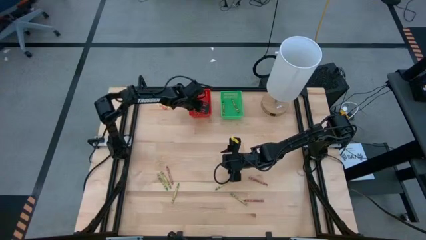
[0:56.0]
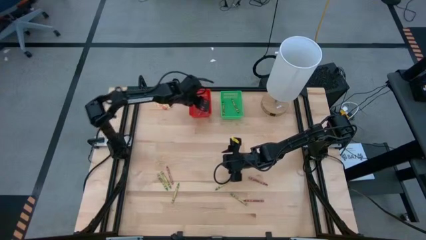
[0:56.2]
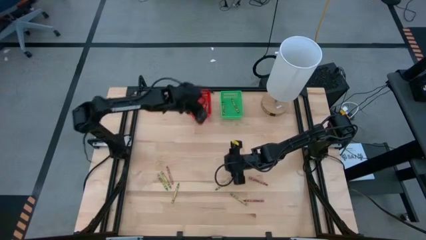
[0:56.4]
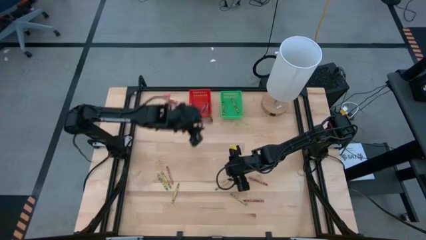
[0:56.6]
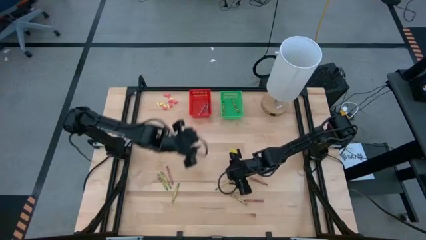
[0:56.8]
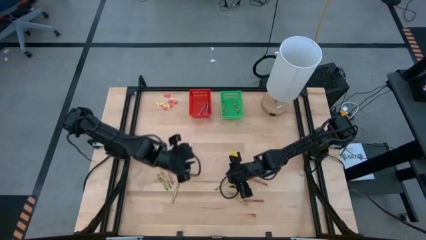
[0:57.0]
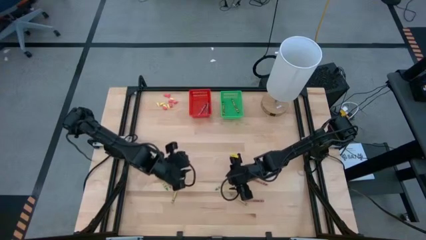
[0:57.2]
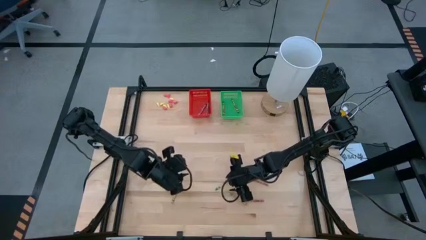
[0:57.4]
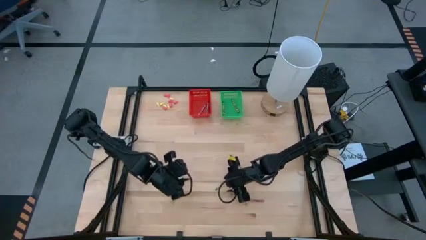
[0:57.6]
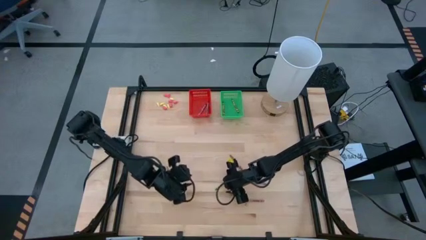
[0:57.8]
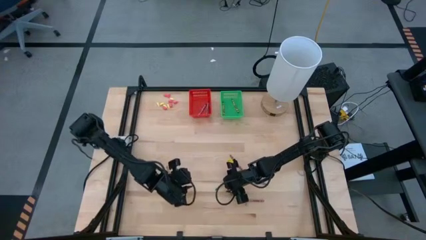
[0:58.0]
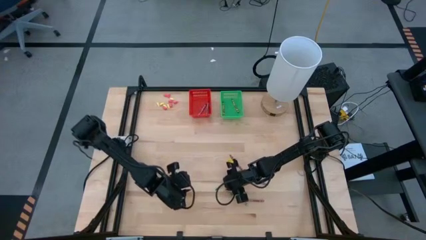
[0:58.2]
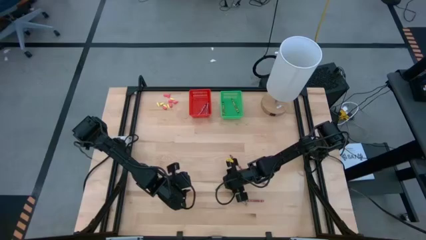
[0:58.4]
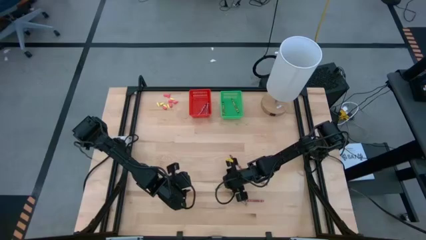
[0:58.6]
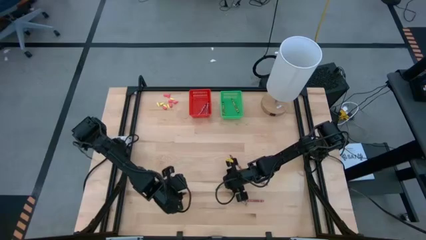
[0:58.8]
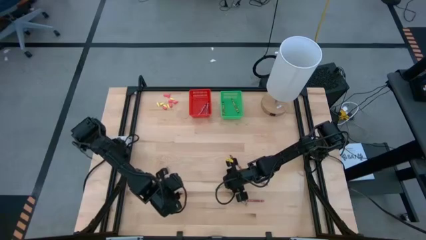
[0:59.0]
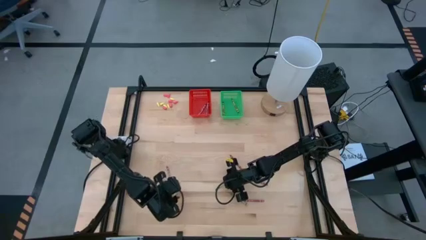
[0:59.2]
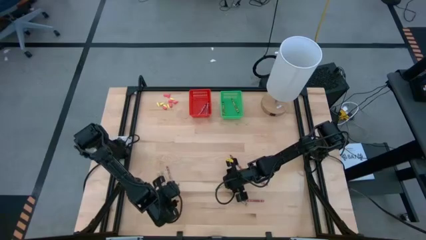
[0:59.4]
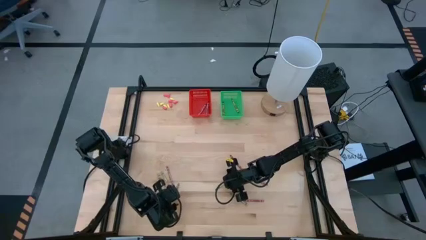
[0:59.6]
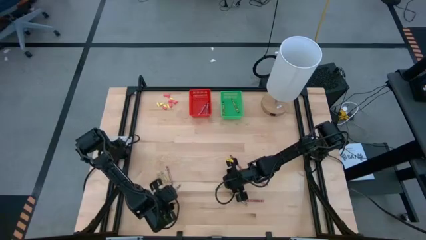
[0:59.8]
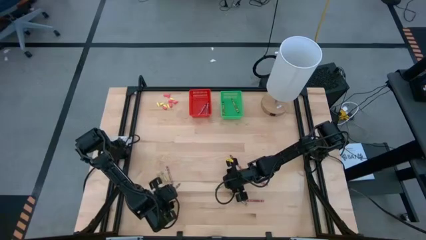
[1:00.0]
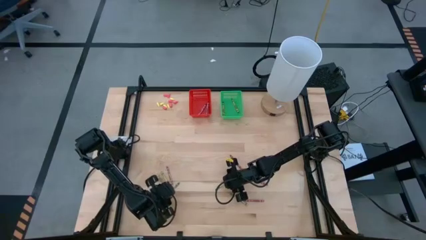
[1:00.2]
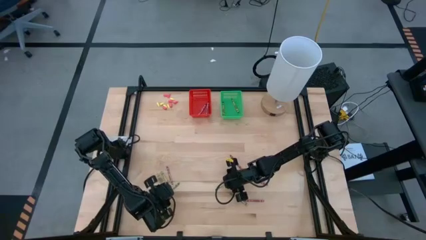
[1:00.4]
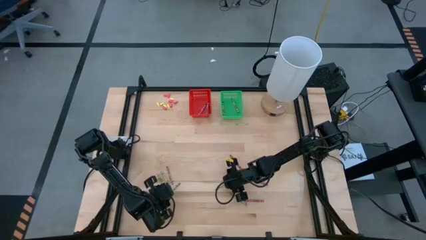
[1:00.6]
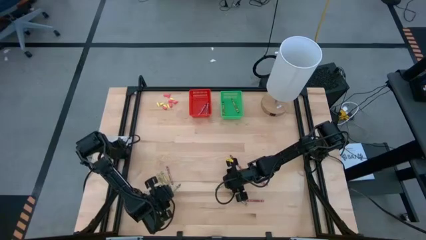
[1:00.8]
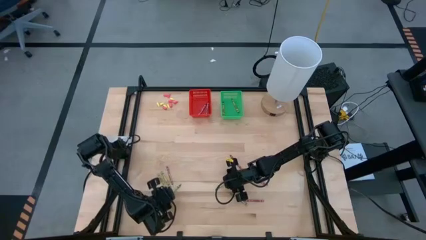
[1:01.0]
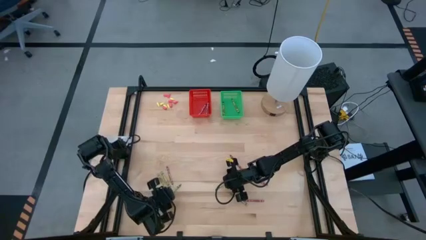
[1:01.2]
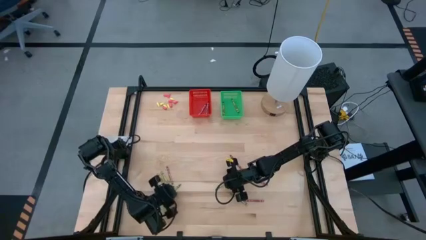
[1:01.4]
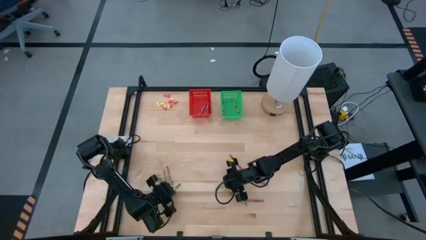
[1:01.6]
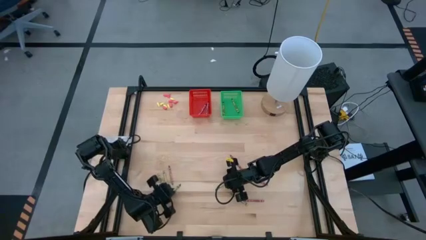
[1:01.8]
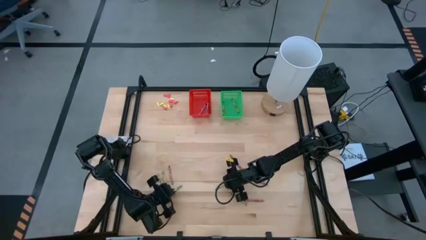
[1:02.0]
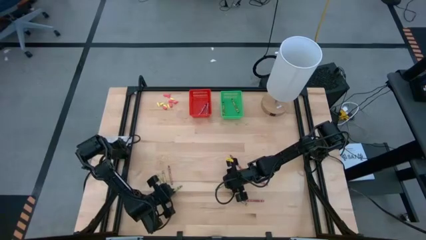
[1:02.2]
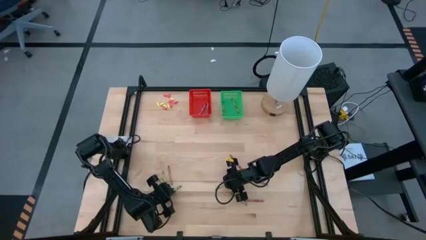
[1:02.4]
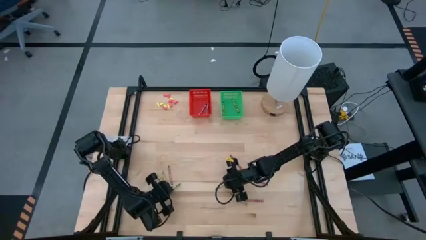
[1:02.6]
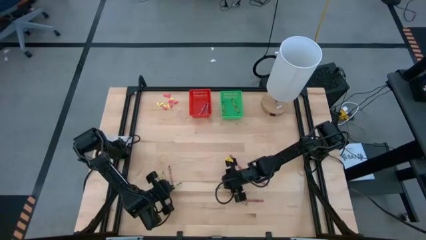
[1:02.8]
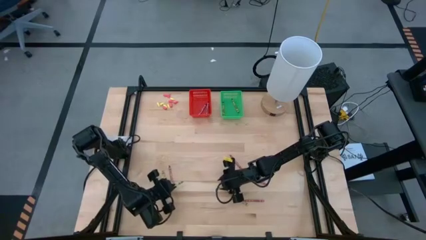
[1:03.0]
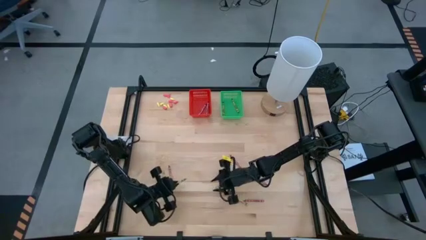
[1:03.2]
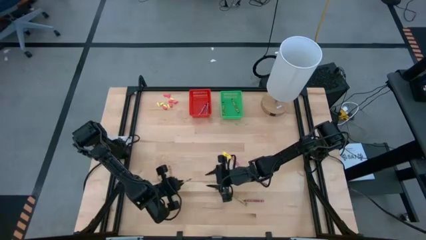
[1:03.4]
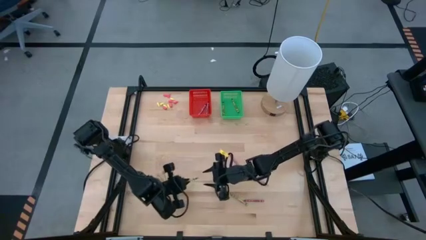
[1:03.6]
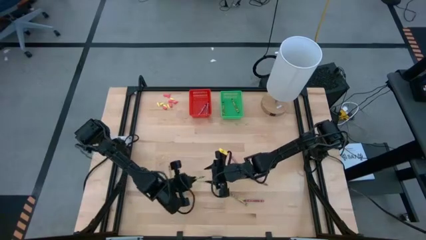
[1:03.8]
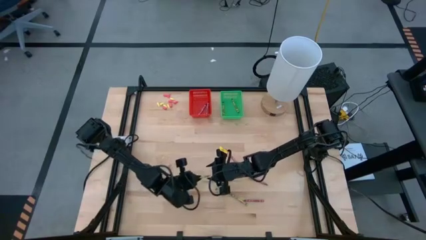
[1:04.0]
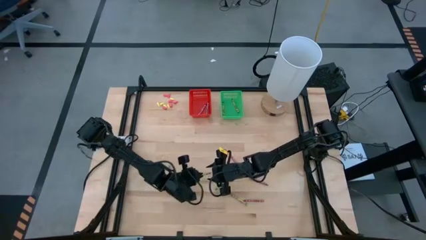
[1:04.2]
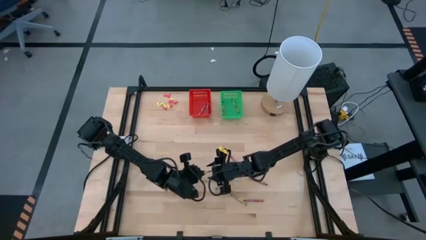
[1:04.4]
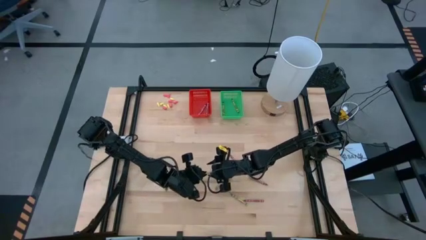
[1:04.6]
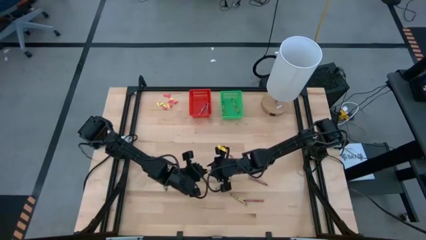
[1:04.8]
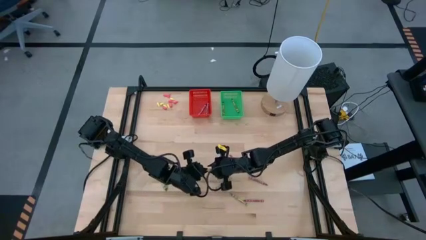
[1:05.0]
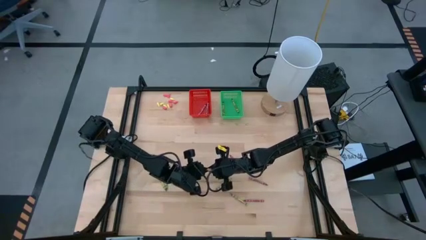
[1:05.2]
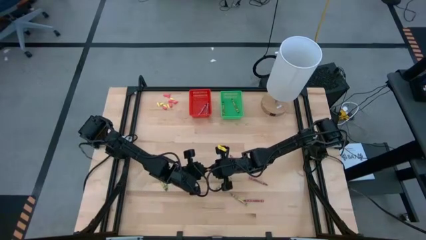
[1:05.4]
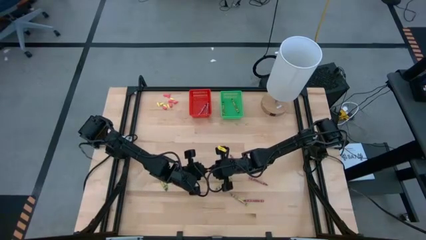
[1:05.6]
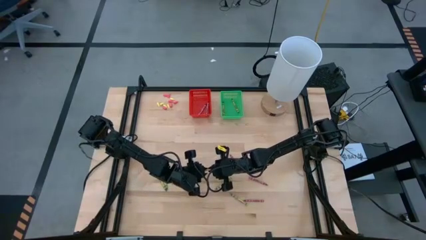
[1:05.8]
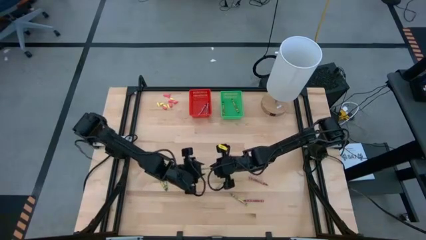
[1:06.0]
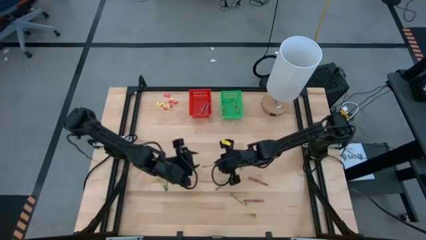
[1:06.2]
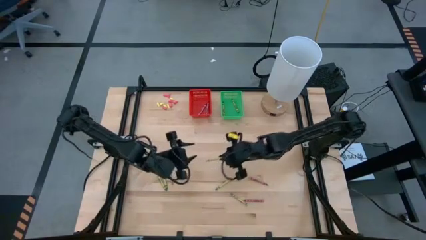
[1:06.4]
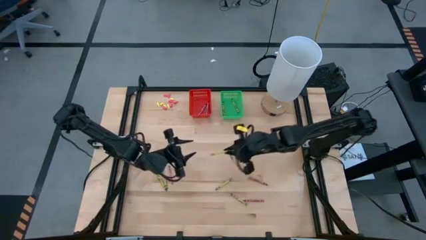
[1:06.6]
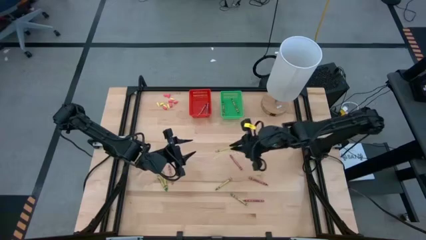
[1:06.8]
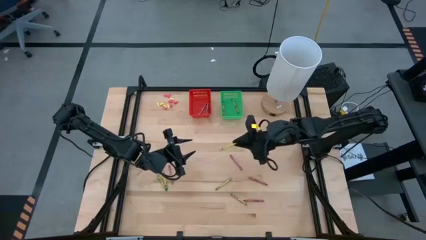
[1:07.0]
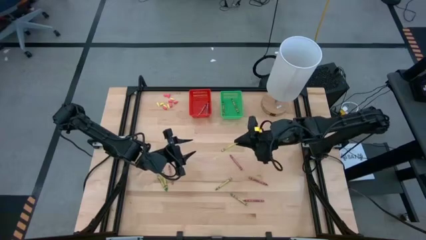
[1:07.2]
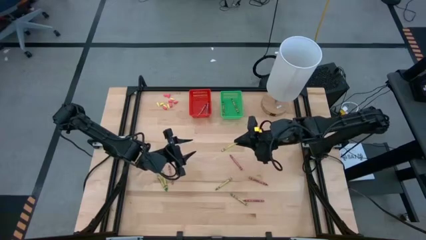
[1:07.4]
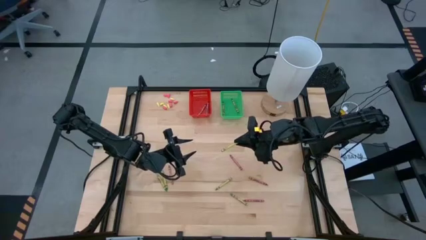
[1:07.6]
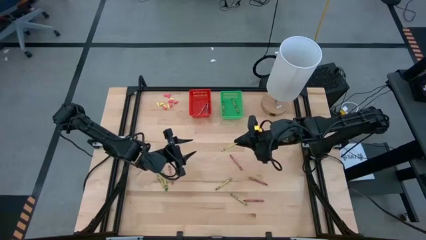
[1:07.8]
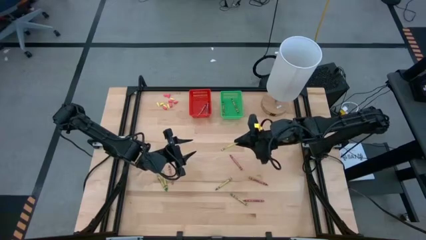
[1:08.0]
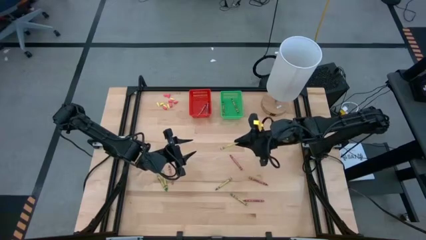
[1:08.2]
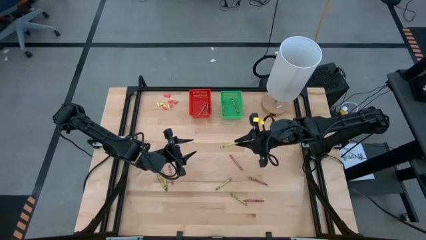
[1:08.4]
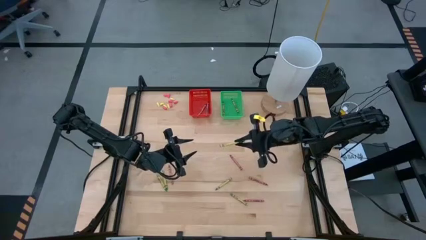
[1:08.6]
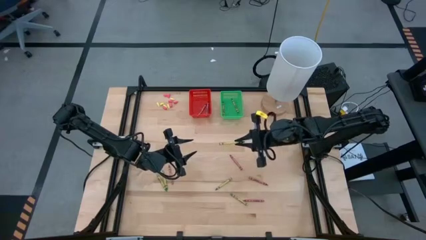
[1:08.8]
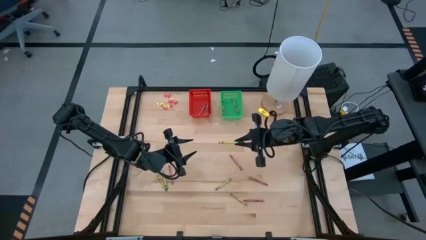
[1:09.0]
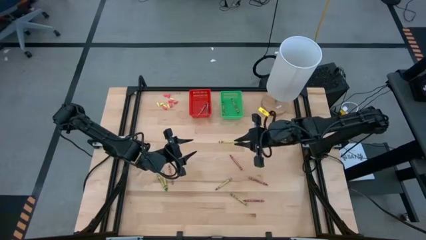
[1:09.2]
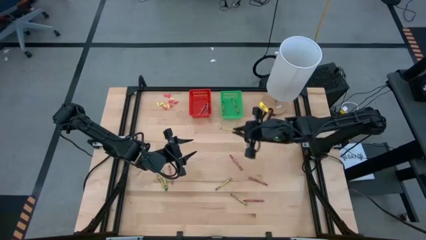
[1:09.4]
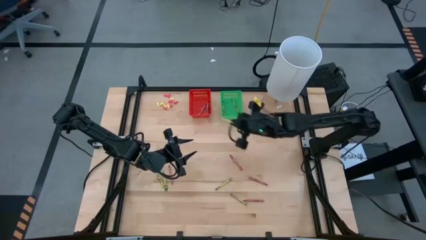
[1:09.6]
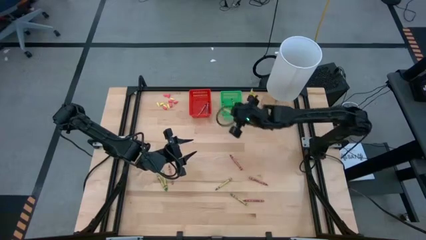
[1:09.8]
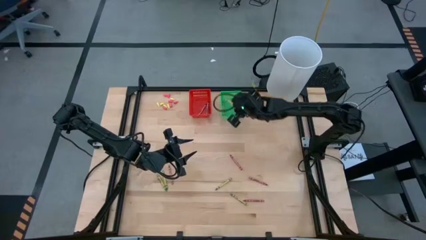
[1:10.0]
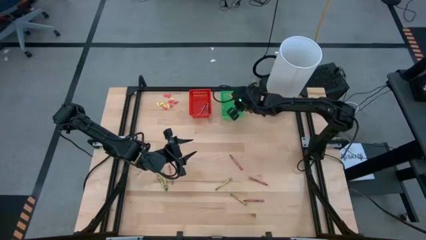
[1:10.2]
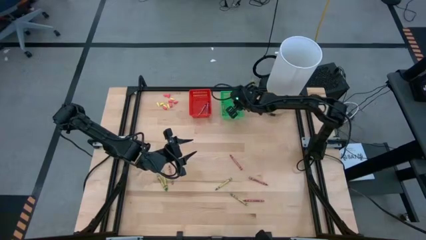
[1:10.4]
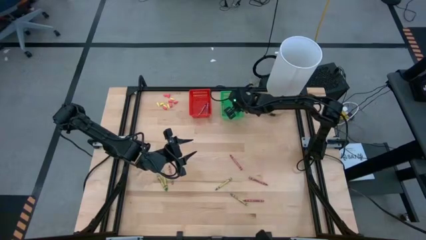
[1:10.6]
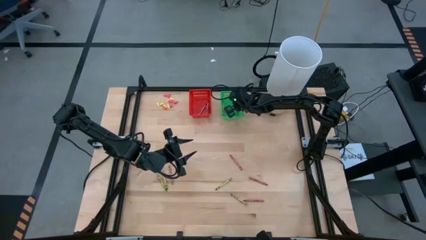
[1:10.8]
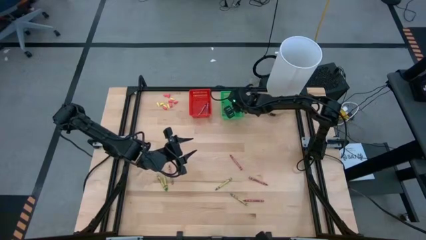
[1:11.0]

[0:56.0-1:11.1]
Task: Sort crayons
Put the green crayon into the green bin
